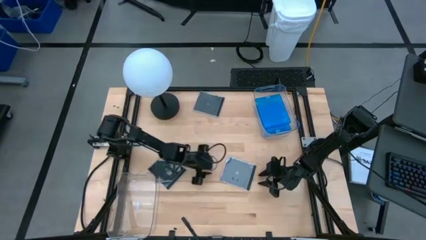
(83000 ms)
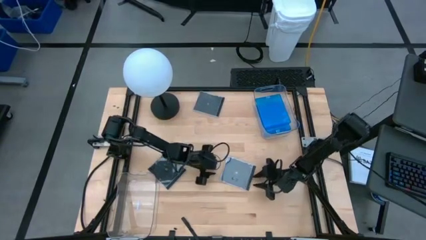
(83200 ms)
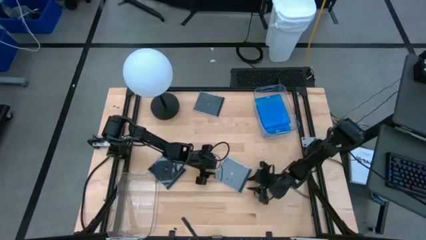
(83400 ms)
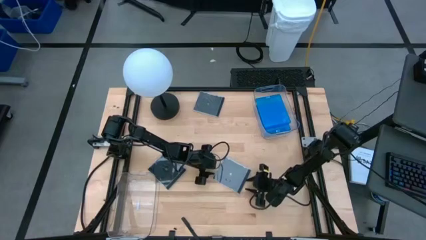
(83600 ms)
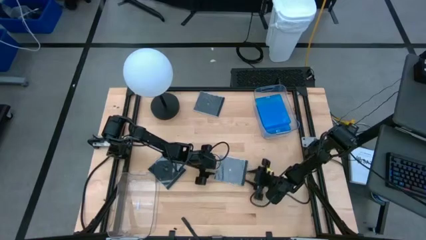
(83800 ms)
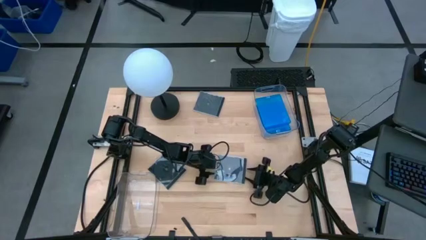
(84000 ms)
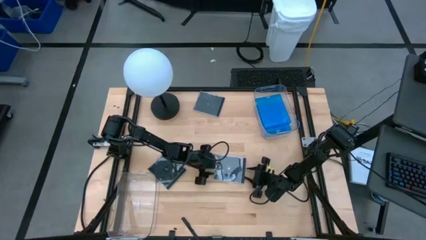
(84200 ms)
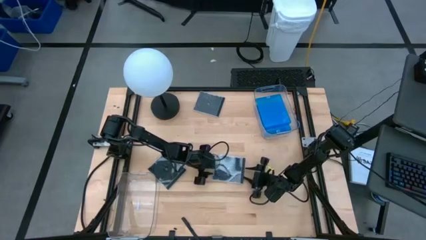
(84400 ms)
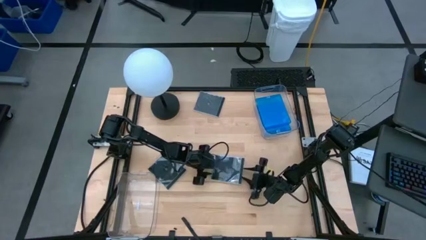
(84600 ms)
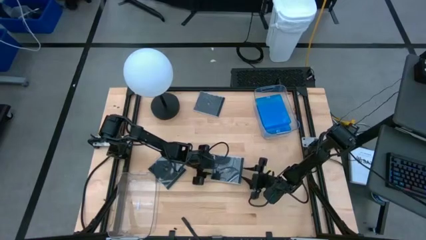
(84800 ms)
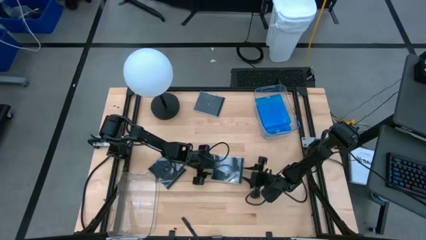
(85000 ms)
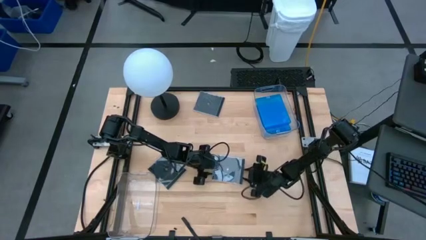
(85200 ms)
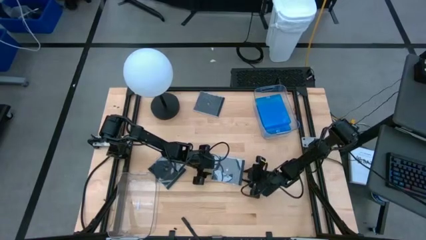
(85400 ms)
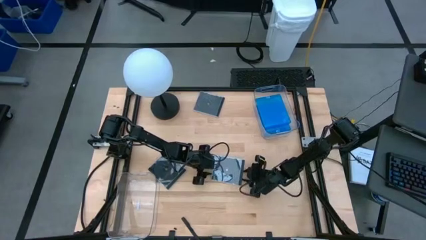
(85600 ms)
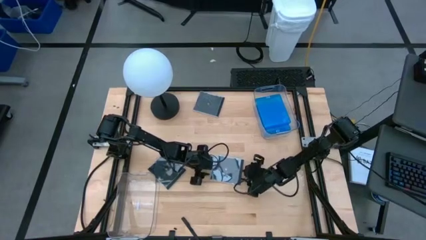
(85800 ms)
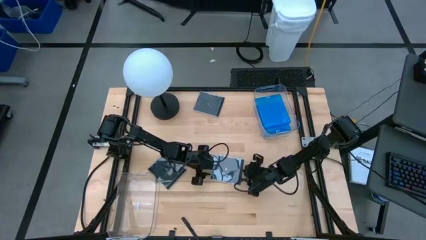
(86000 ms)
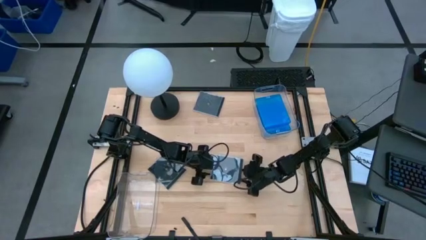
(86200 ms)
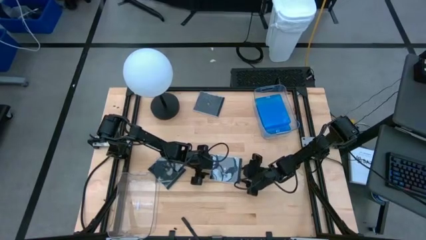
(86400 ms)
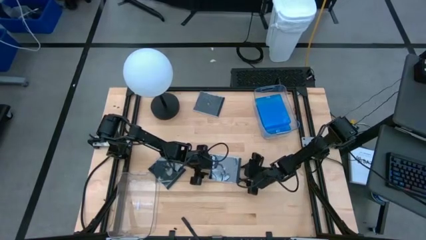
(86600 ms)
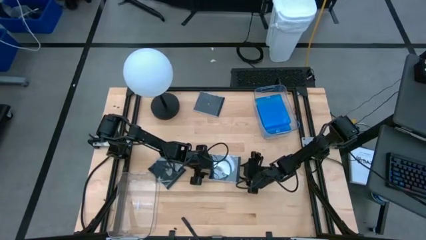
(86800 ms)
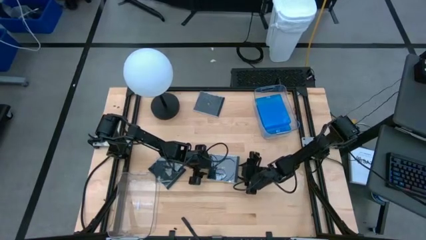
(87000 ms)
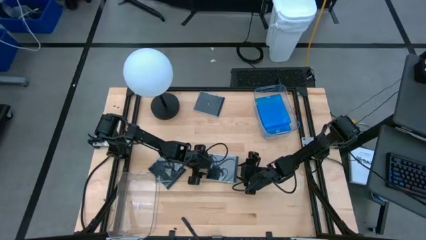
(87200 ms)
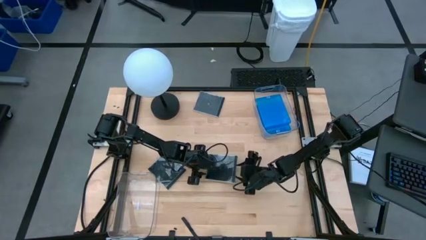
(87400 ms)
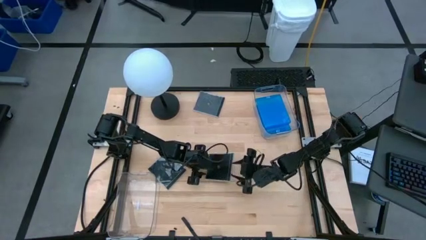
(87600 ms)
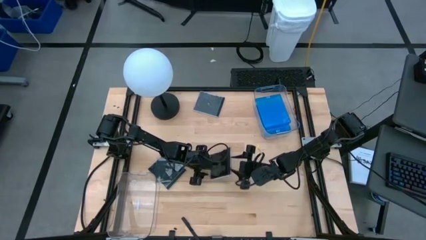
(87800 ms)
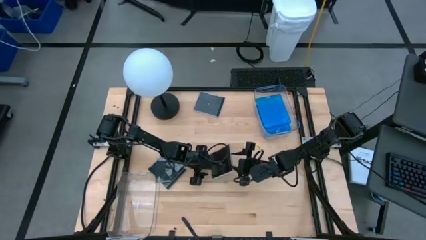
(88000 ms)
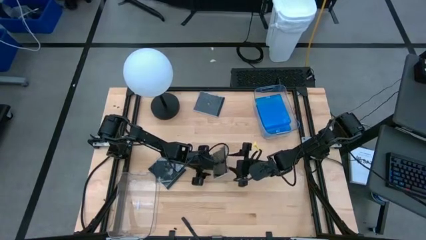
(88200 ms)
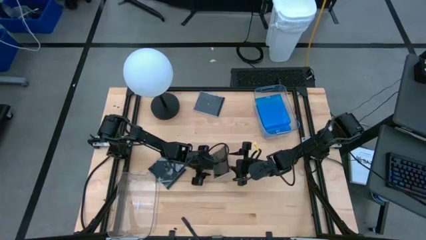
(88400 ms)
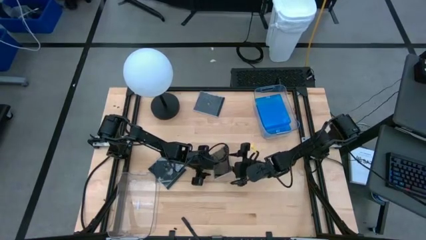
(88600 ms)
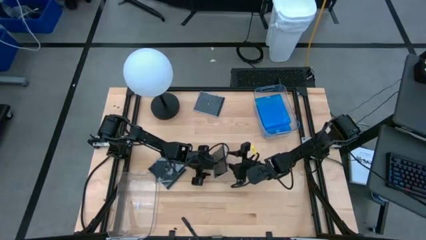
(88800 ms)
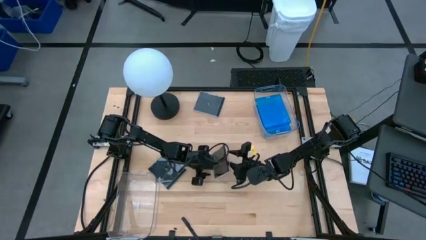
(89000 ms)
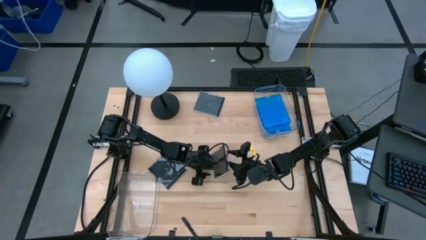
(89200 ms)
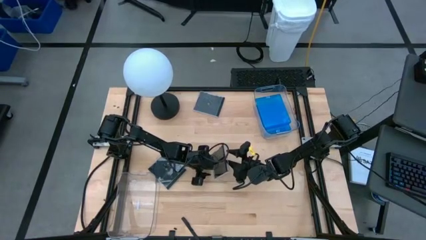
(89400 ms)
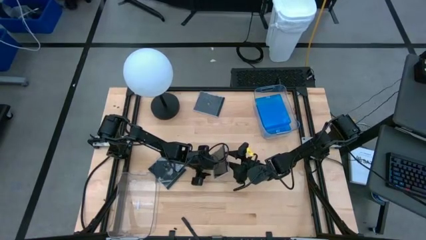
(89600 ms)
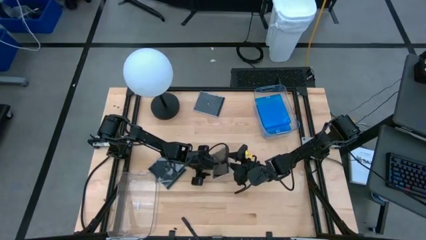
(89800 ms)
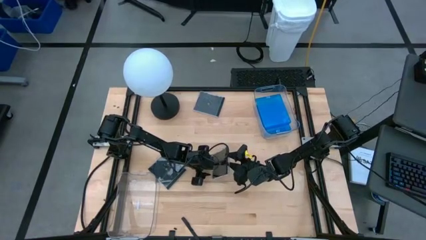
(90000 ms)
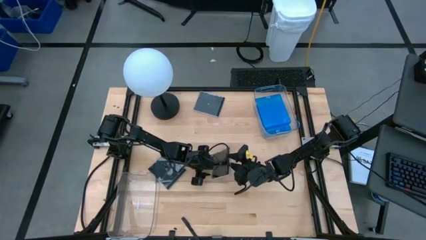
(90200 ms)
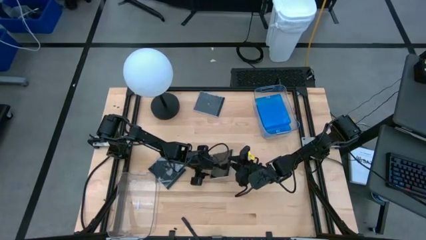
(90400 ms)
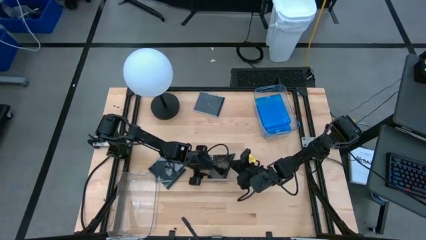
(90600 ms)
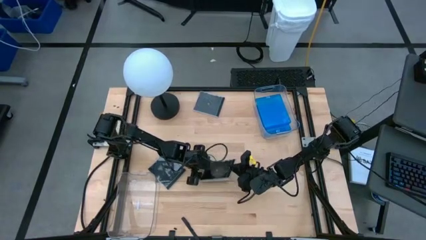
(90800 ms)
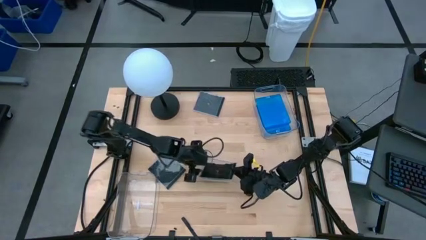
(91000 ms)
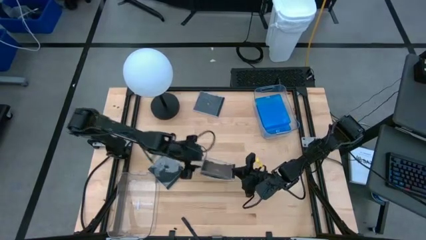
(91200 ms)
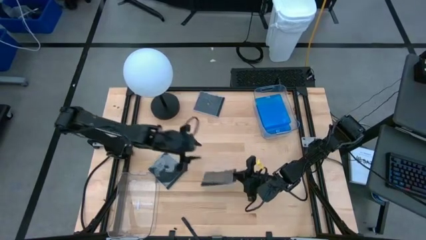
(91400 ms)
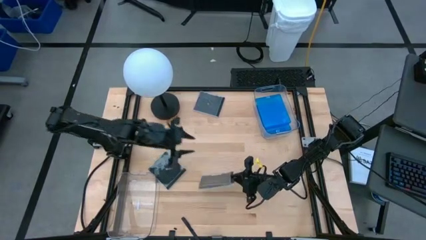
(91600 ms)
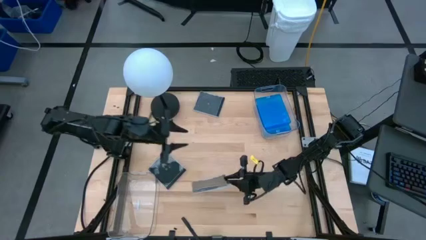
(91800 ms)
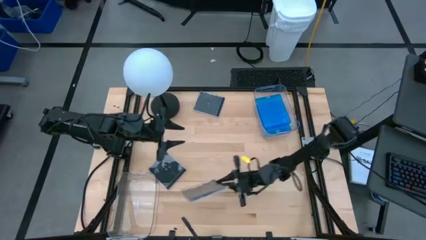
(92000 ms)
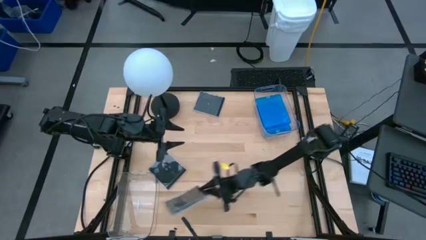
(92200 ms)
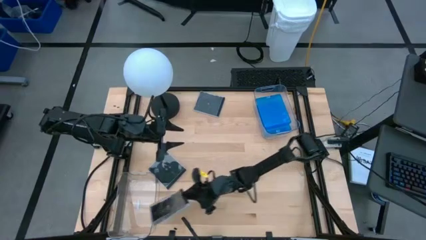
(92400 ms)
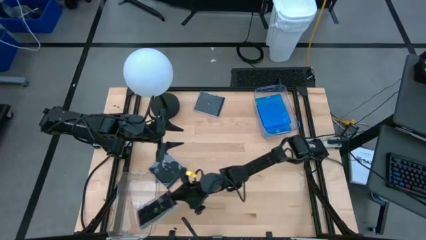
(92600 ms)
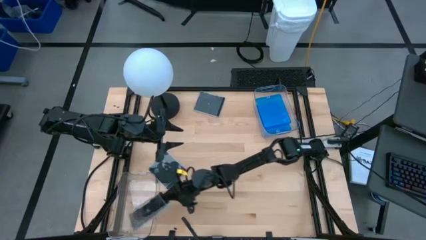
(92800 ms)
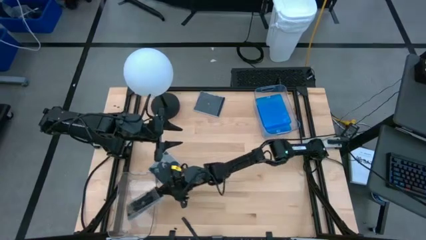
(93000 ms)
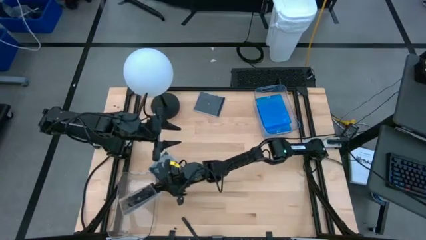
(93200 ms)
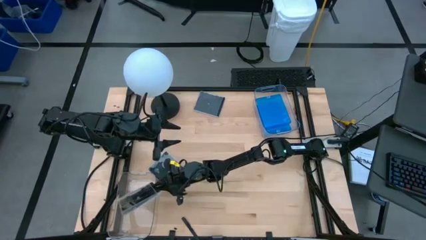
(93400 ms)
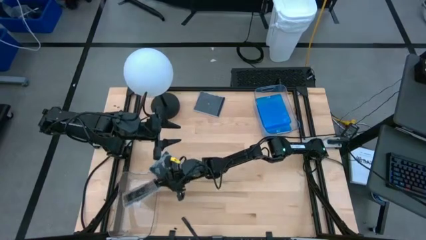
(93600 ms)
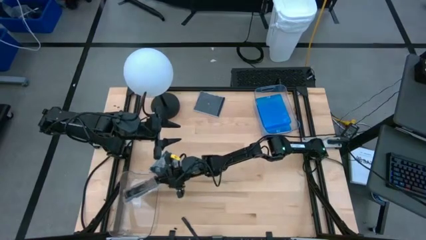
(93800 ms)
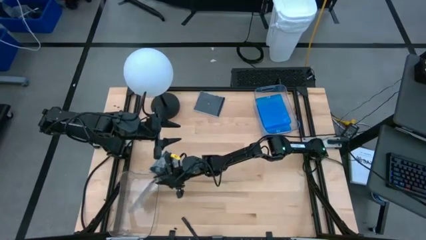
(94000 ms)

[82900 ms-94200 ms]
Task: Pick & place jewel cases by type
Put the middle black CD case into the bottom transparent bin

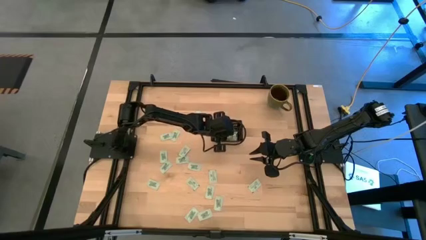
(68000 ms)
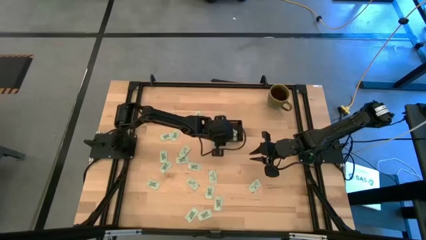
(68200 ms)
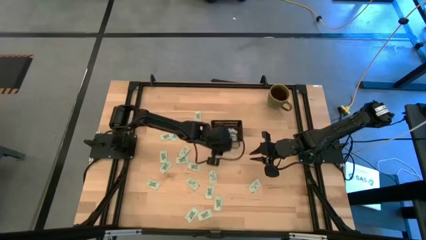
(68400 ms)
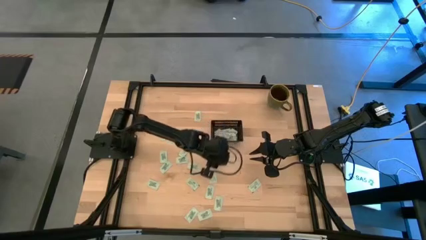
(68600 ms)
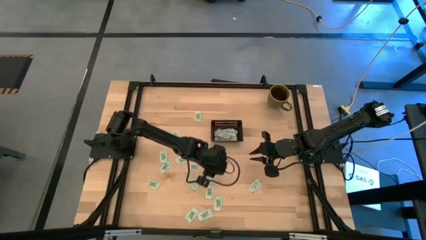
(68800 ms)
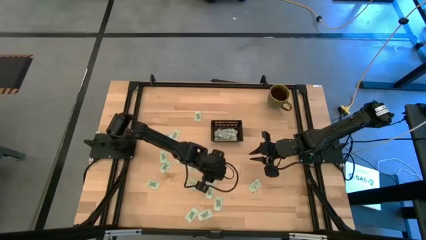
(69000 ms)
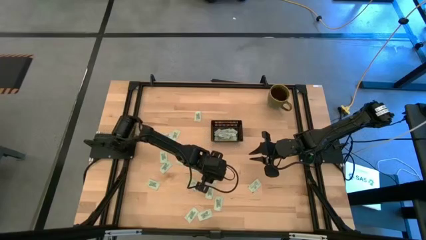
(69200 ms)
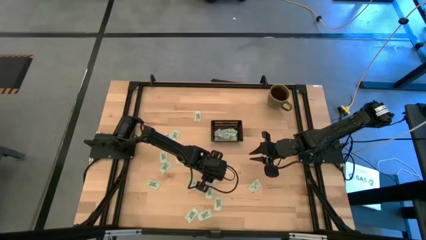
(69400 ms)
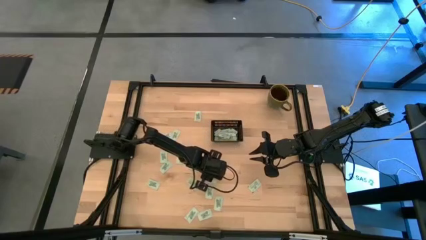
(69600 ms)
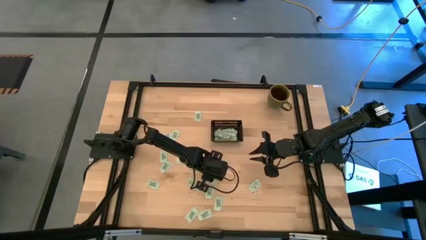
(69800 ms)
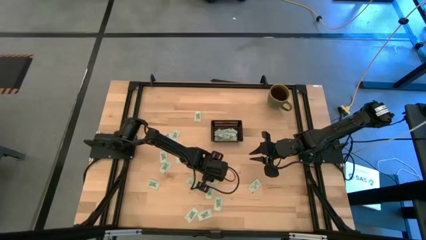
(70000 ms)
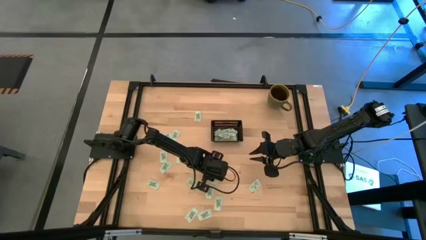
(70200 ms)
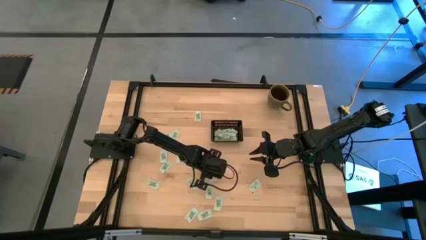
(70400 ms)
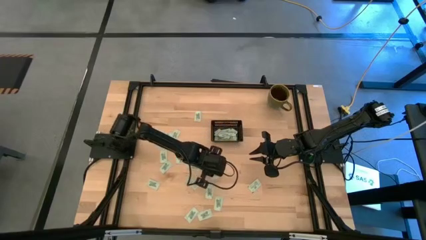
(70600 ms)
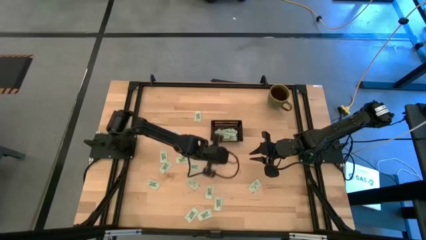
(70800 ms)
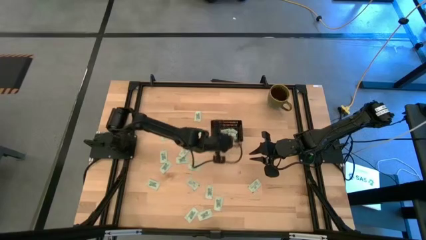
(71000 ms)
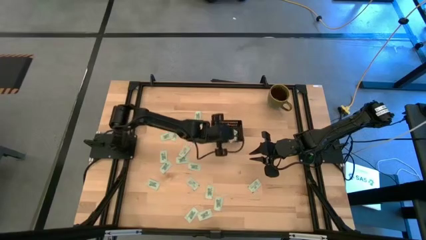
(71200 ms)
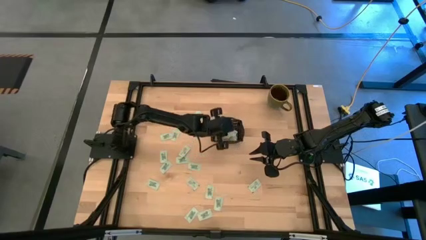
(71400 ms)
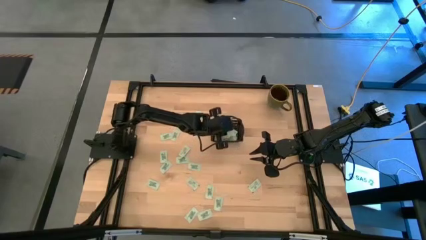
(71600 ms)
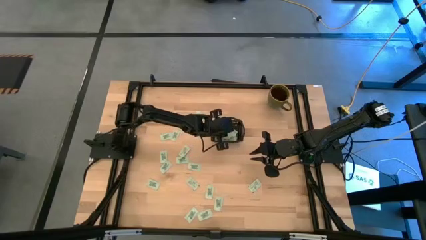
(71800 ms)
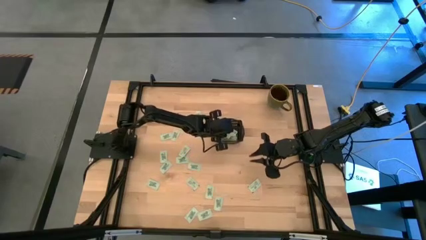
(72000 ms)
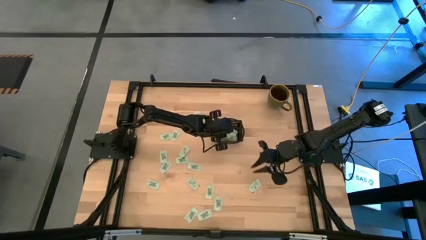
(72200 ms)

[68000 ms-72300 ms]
Task: Pick and place Stevia / Truvia into bins
Put the stevia packet into the black basket

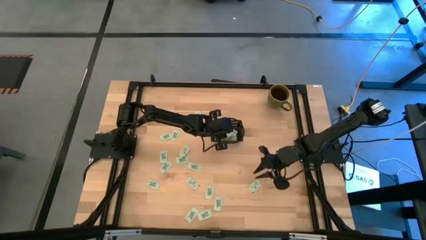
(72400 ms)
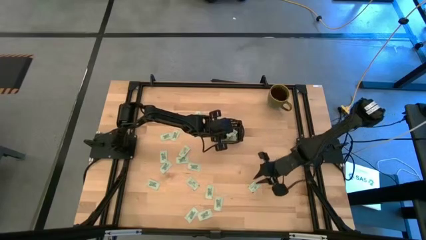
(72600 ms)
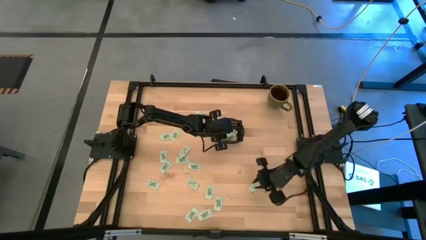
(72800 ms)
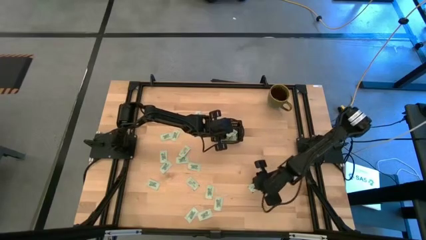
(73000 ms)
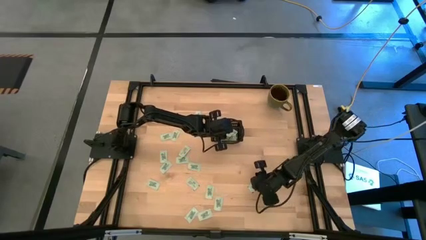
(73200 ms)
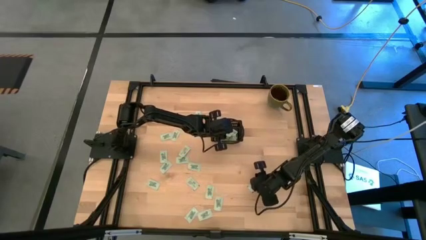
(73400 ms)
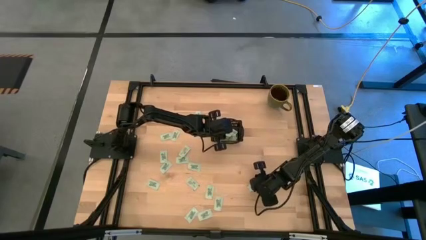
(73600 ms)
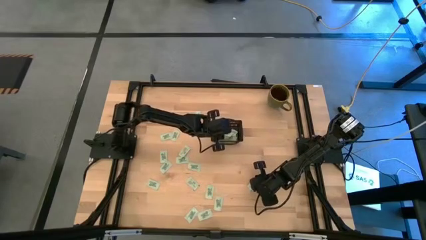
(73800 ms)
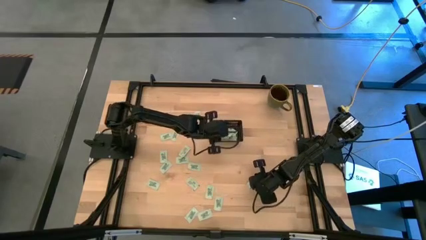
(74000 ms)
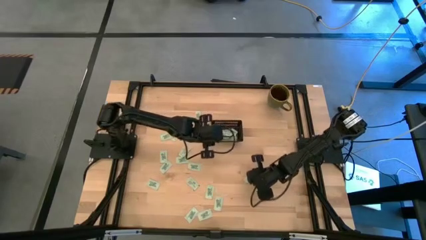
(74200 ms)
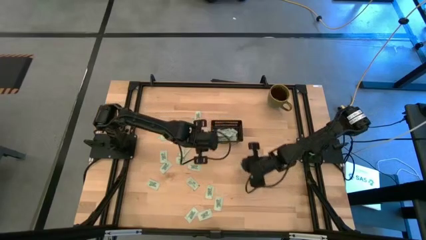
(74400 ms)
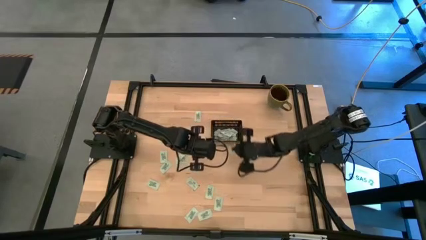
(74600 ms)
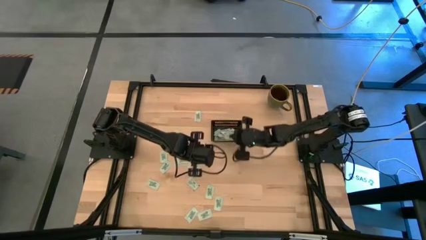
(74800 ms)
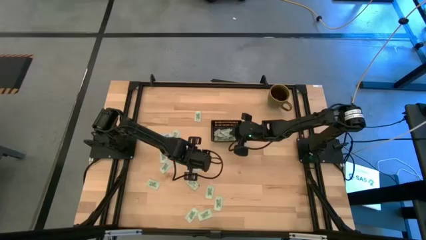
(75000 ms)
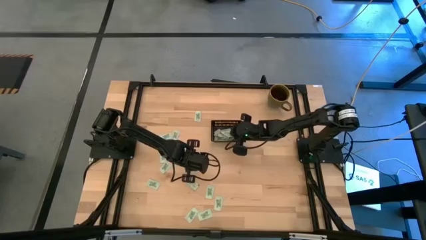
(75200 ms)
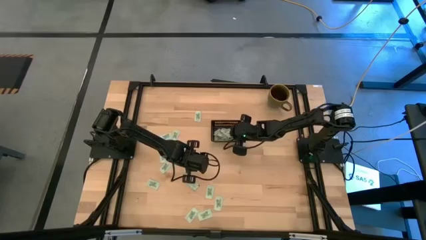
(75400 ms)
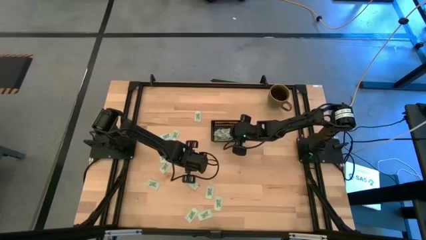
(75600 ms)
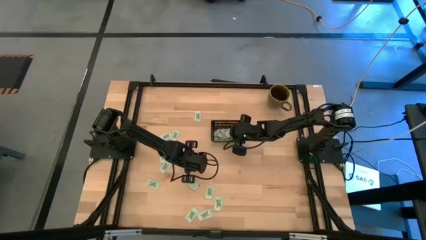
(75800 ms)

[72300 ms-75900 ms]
Put the stevia packet into the black basket
